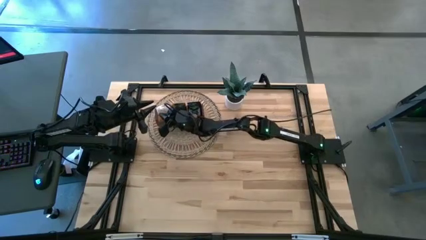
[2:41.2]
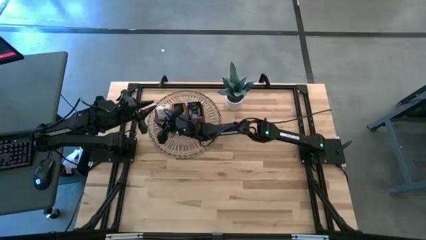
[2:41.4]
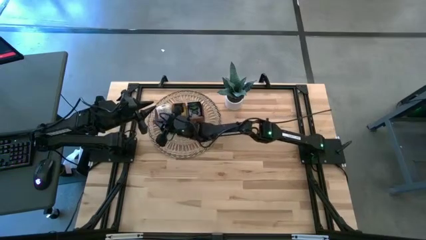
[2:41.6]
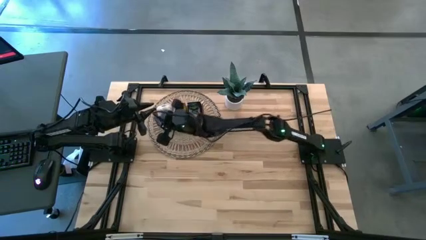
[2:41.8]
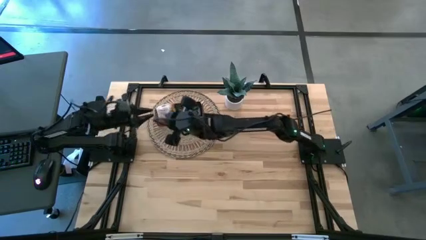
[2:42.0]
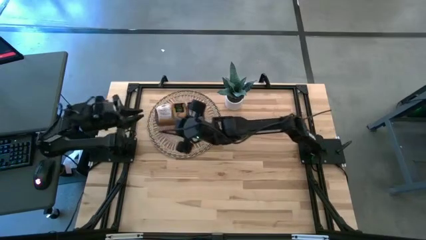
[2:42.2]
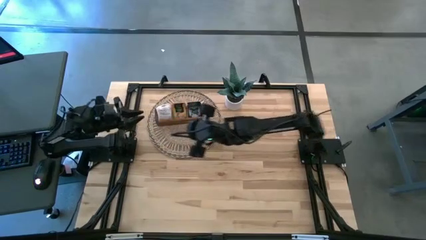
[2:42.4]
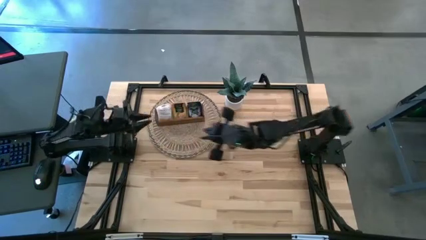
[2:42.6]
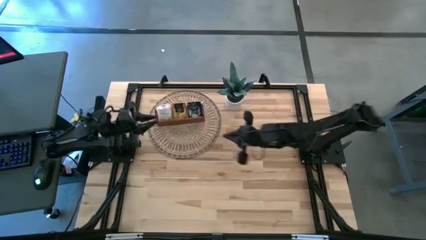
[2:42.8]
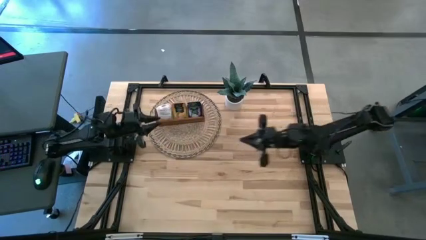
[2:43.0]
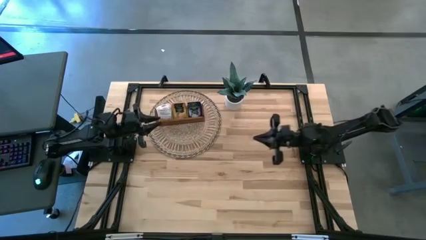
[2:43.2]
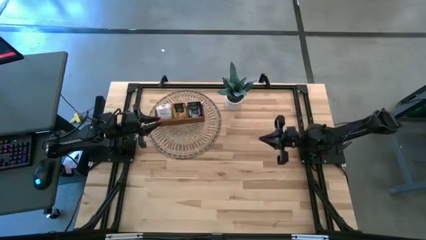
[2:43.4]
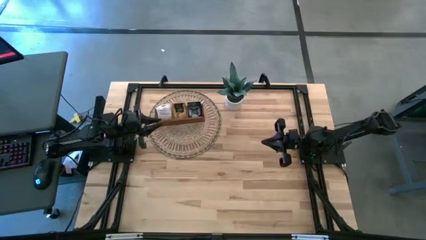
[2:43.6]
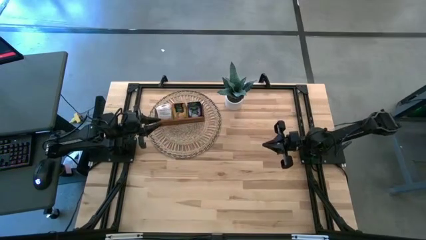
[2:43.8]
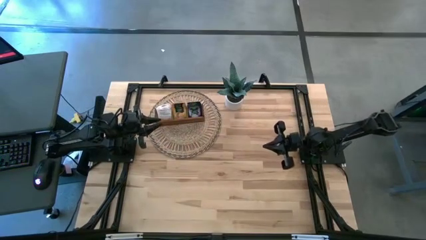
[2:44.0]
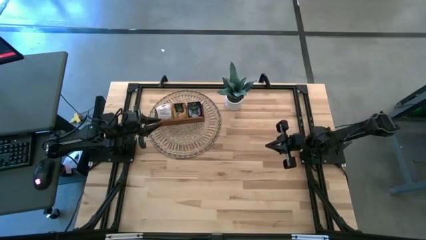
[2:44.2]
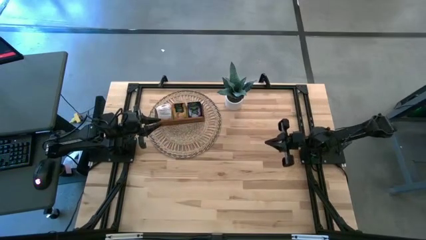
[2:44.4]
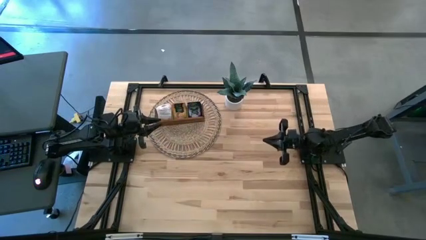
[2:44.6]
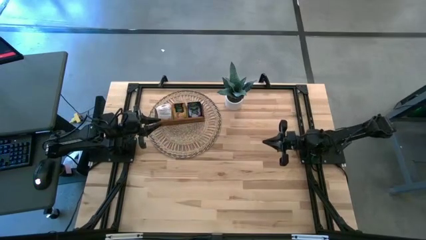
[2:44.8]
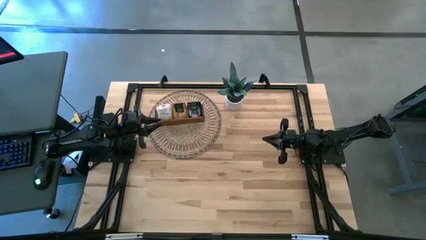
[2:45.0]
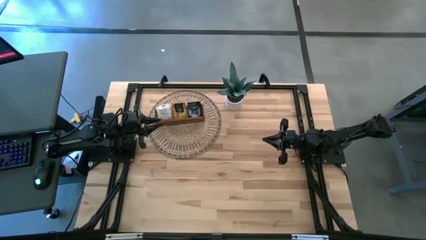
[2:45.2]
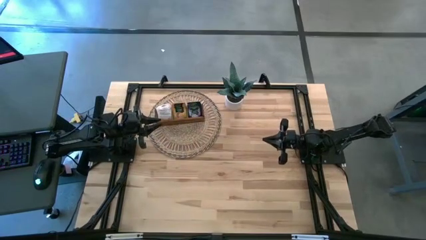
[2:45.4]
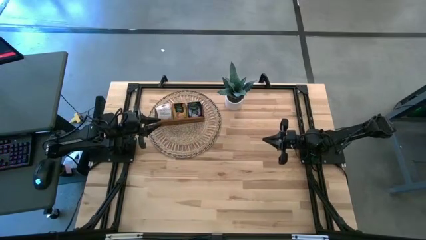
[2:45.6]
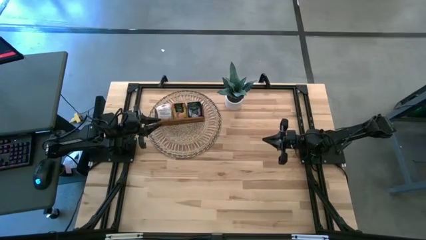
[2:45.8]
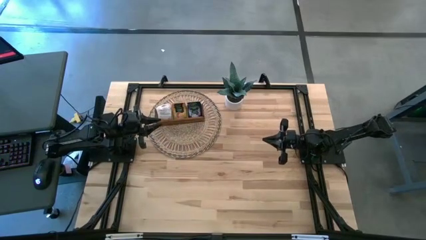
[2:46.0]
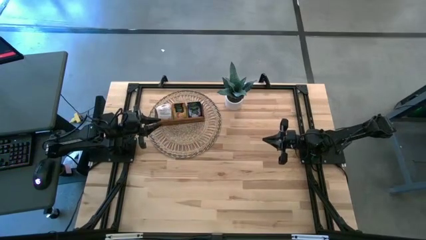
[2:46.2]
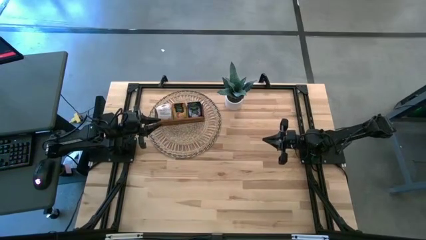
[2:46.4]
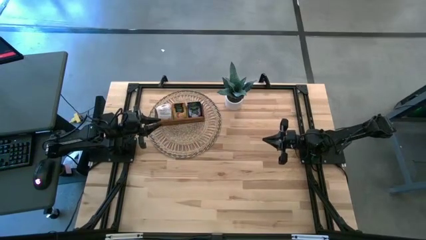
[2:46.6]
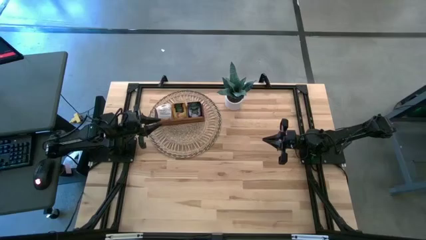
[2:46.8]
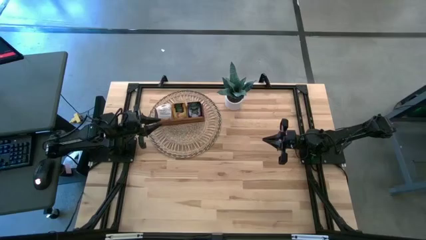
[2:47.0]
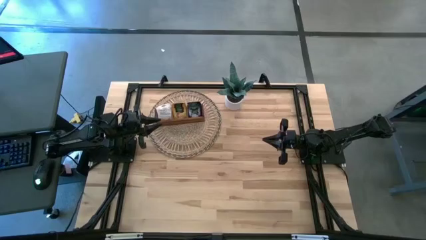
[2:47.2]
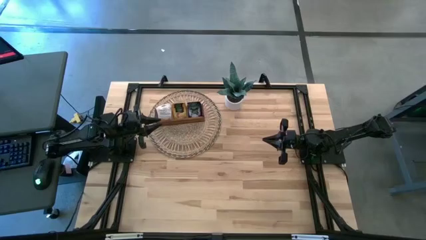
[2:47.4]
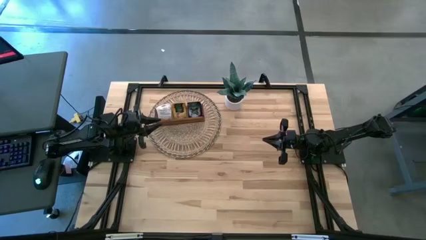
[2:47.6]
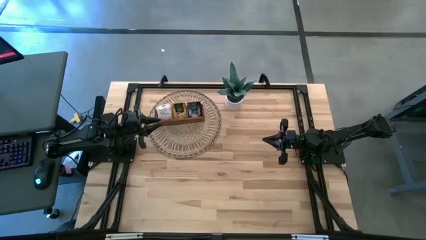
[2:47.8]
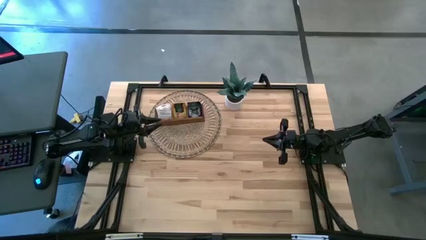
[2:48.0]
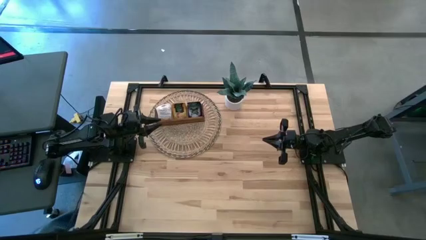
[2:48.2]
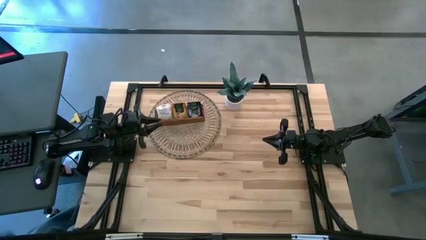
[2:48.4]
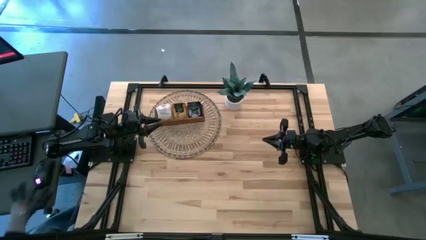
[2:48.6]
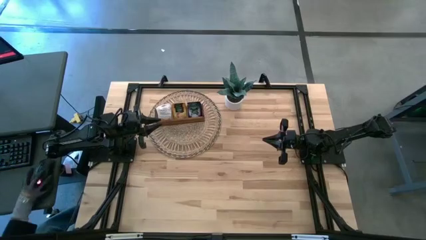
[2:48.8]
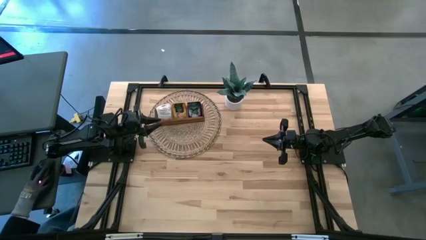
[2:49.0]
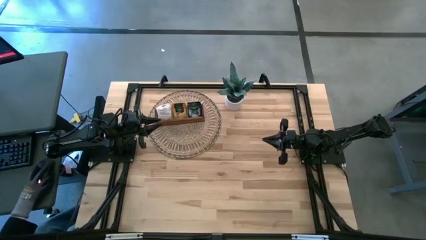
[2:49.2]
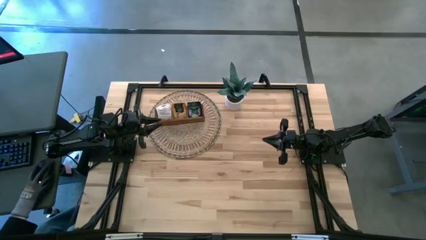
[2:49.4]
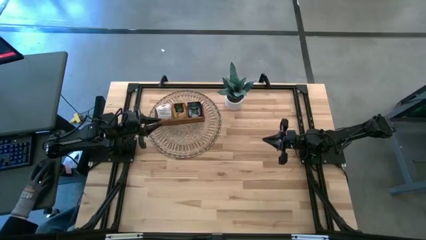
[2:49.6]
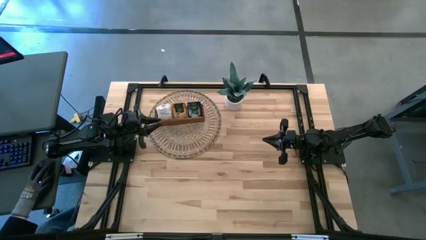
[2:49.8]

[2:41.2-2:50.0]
Task: Pick & Place Tea
Return to Home Position

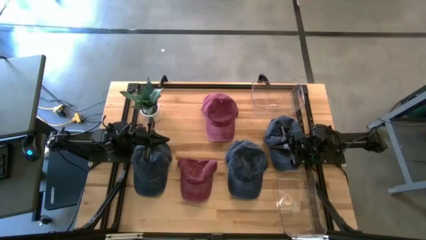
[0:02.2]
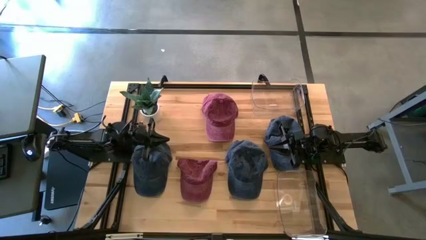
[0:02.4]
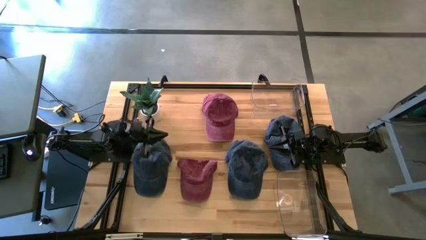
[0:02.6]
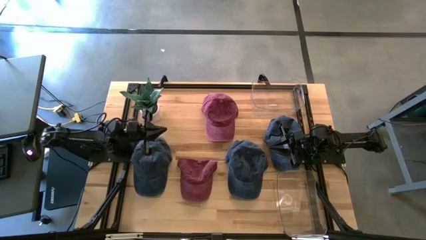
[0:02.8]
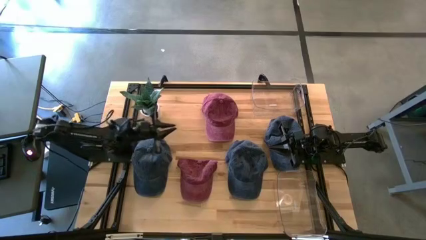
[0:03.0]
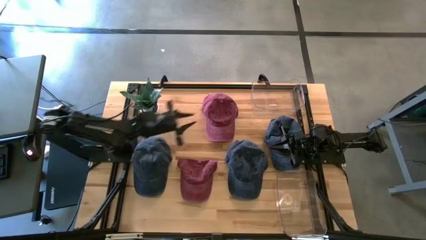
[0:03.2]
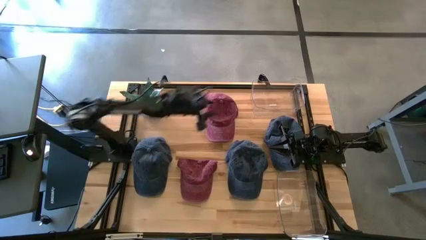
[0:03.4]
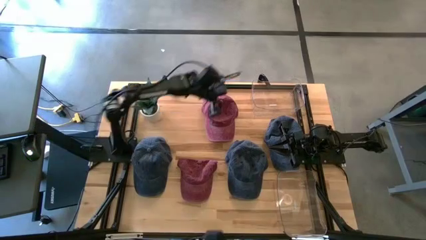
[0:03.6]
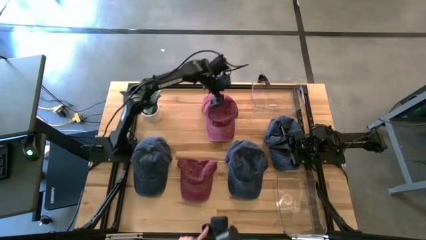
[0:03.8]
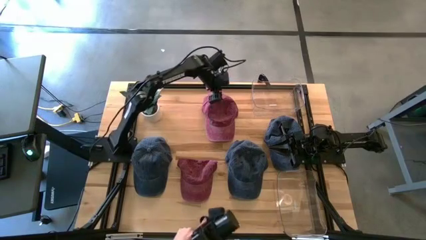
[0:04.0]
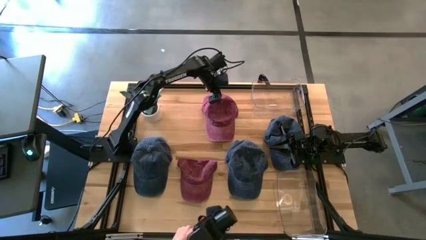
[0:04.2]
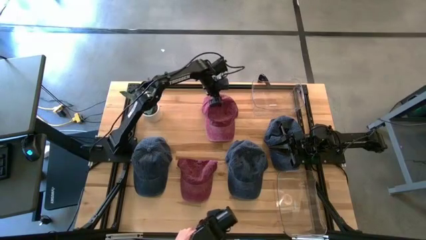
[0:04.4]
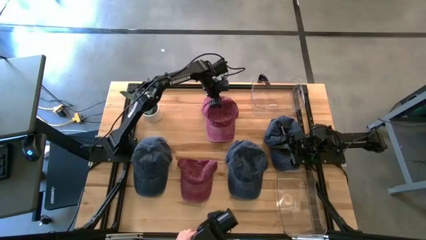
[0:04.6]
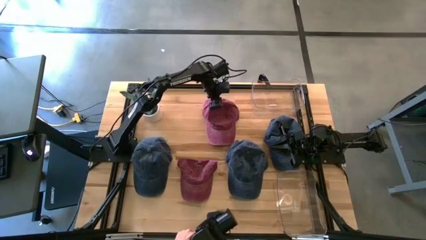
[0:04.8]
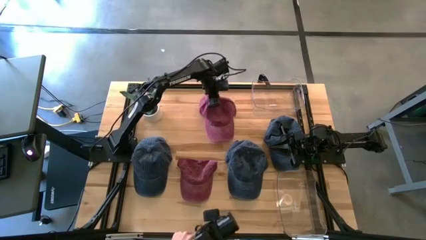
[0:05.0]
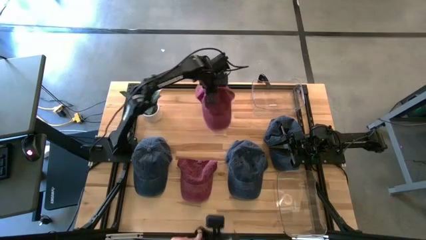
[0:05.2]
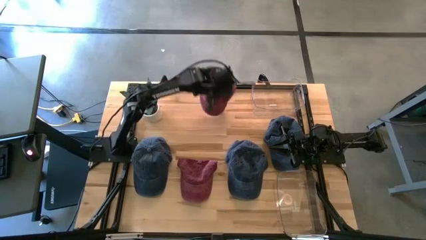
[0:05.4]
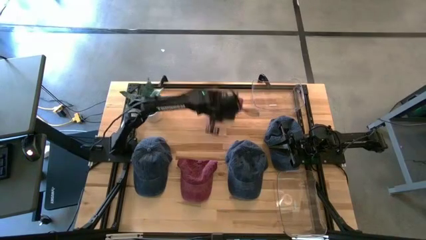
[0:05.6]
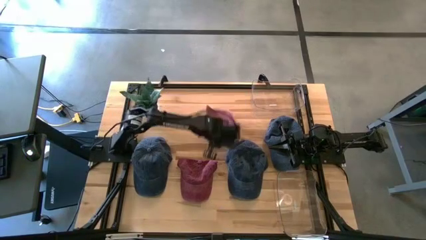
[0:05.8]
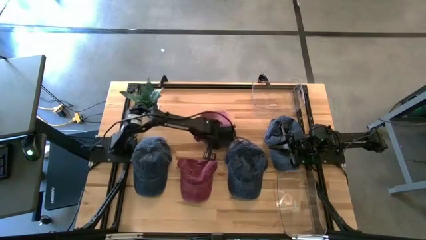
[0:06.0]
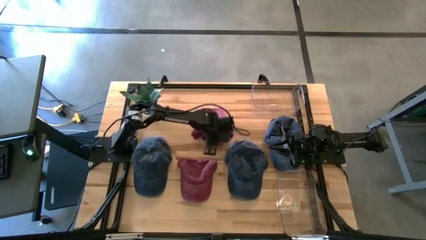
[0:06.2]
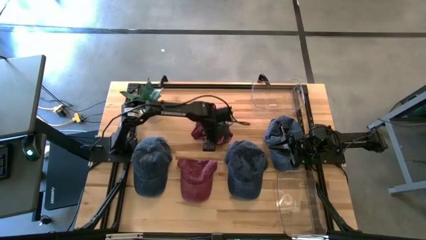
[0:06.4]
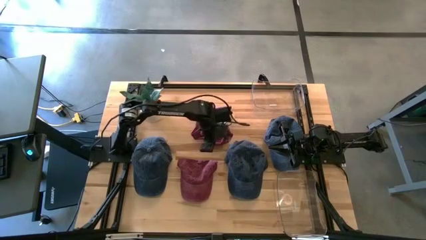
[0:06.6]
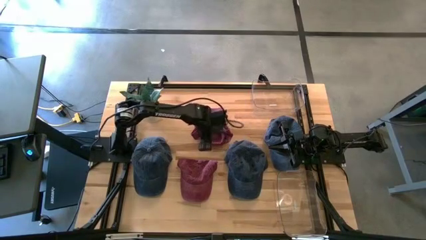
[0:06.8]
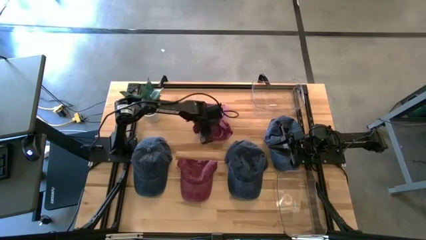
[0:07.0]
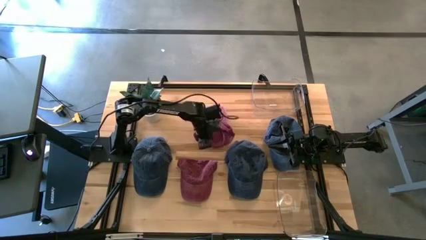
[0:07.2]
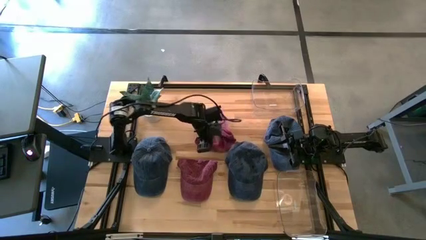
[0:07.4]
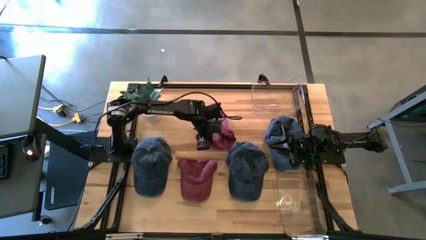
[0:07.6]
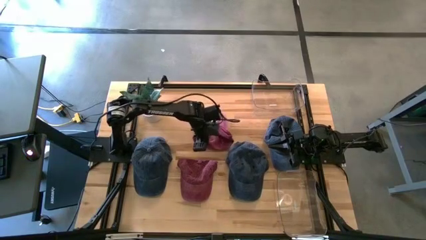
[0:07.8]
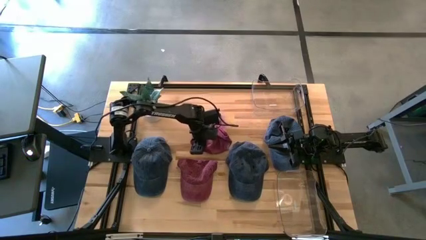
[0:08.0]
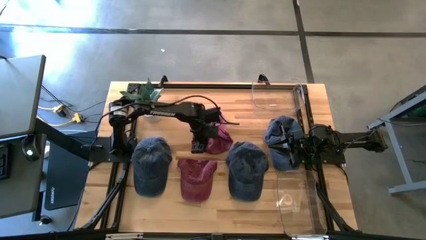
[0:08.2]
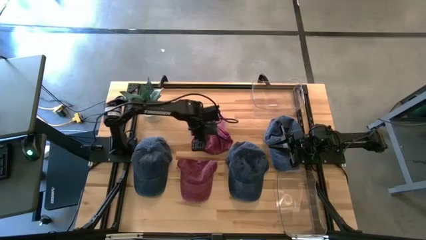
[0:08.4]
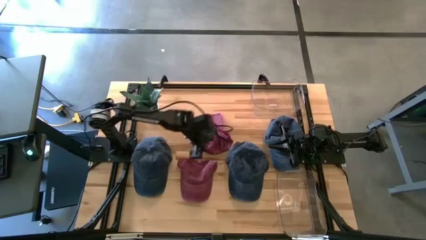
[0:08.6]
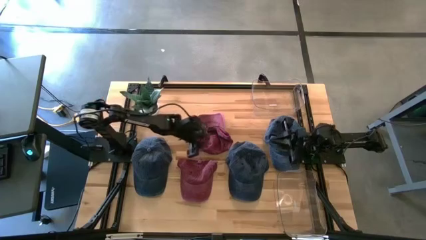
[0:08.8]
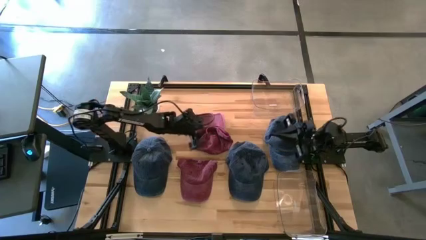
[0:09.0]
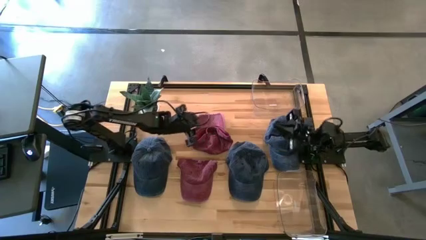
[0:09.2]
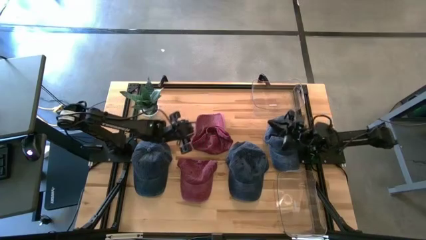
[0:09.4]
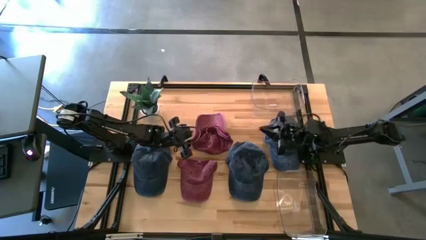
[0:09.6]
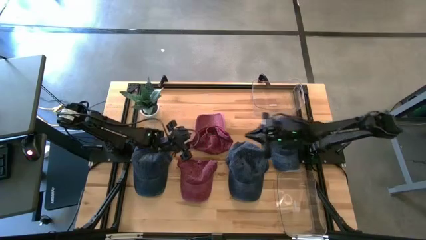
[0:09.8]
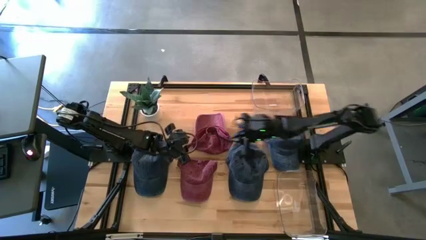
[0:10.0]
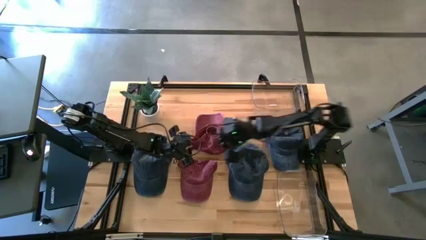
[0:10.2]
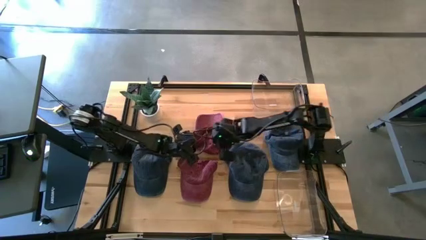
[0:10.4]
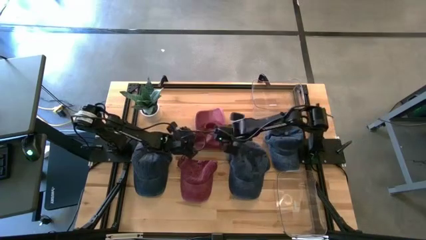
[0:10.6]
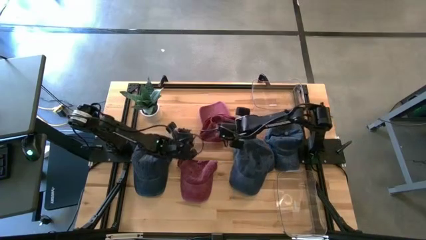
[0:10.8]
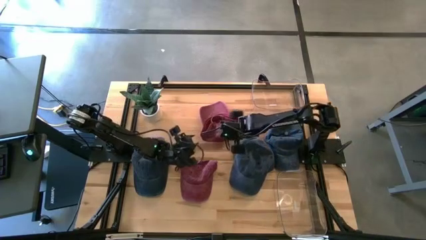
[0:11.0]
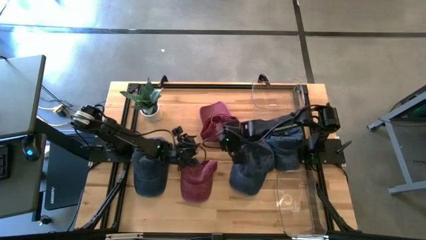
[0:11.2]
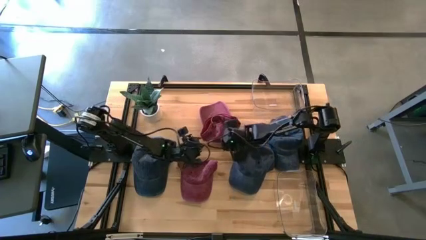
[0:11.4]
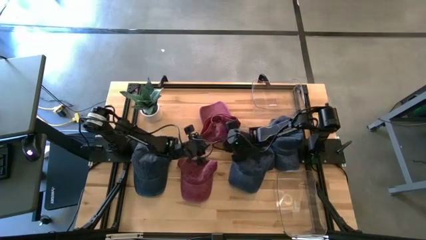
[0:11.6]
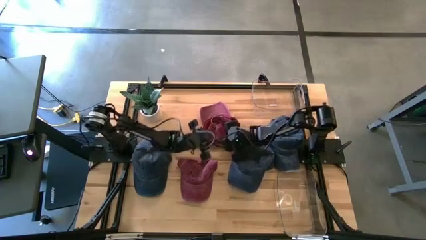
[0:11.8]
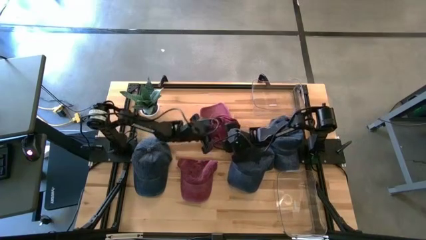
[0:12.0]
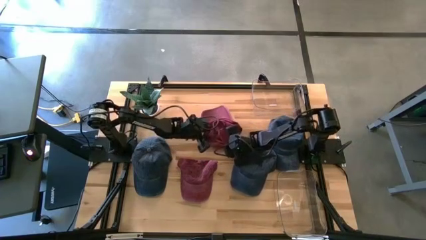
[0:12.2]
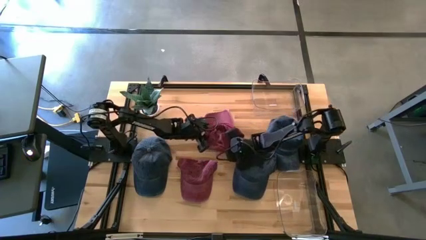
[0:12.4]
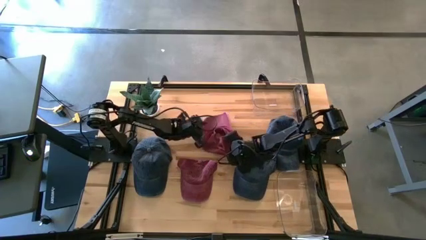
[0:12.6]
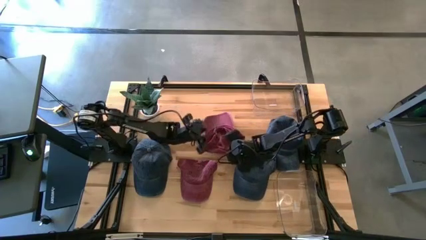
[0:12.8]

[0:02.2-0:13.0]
Task: Pick & Place hat
Put the top red cap into the top transparent bin
